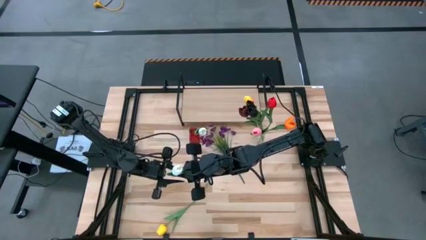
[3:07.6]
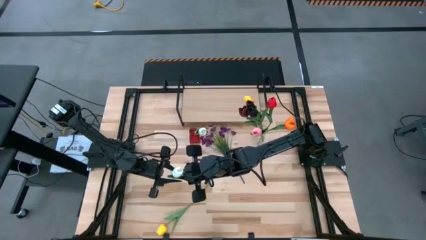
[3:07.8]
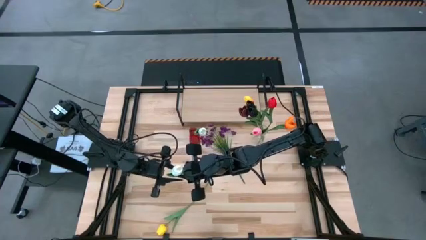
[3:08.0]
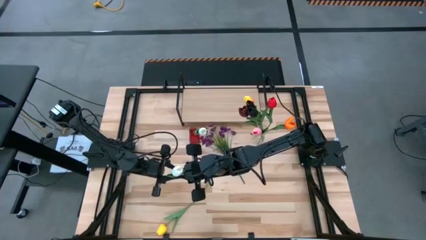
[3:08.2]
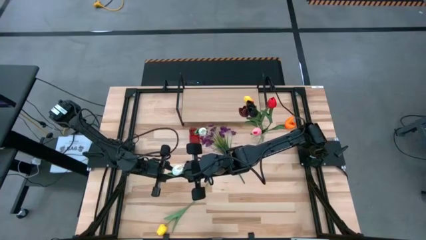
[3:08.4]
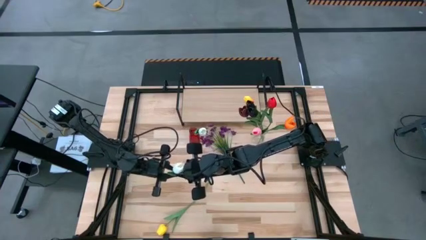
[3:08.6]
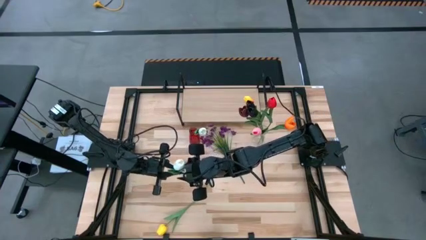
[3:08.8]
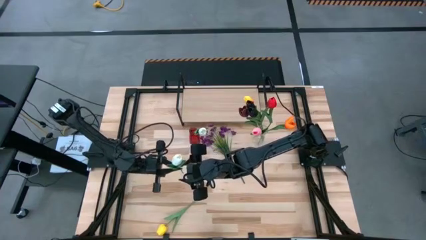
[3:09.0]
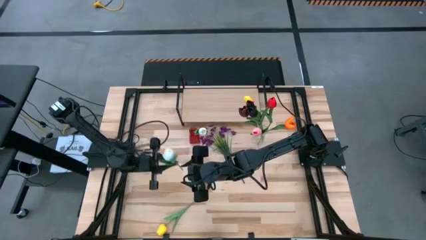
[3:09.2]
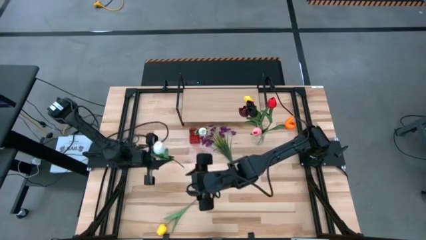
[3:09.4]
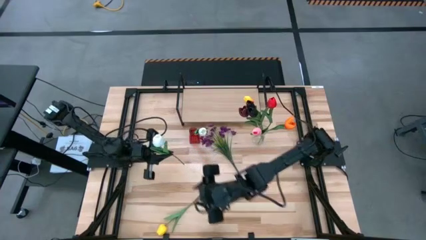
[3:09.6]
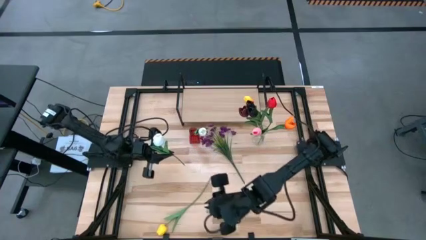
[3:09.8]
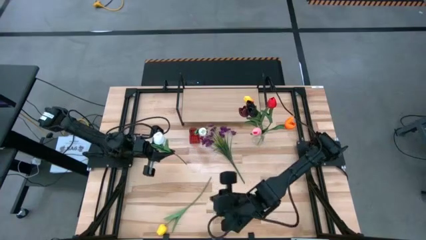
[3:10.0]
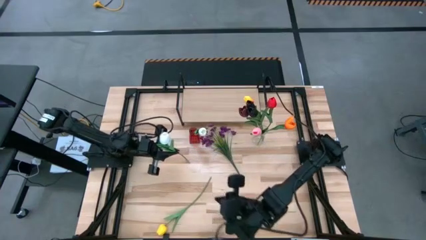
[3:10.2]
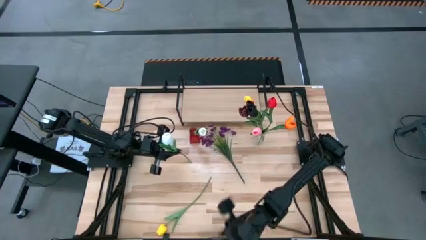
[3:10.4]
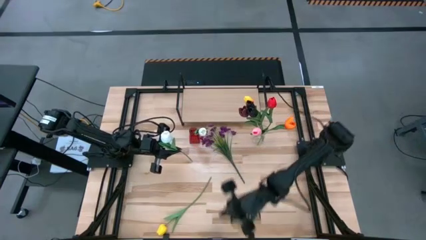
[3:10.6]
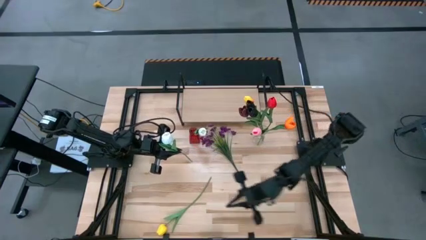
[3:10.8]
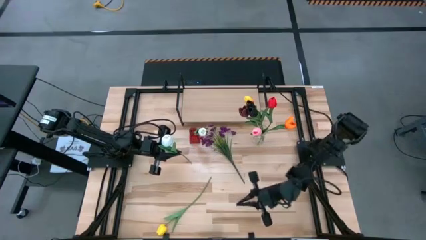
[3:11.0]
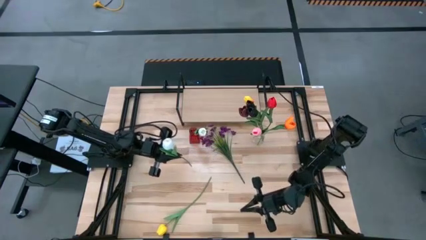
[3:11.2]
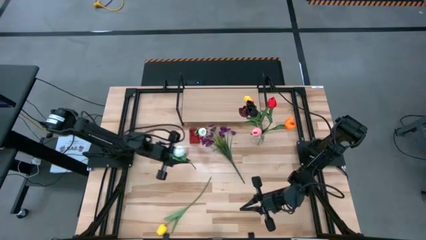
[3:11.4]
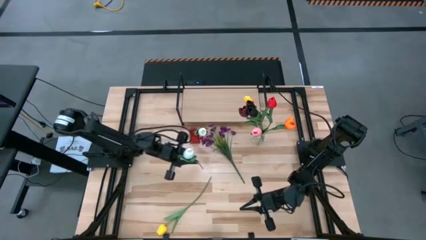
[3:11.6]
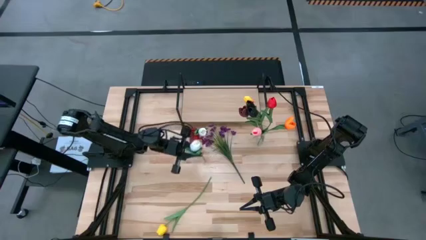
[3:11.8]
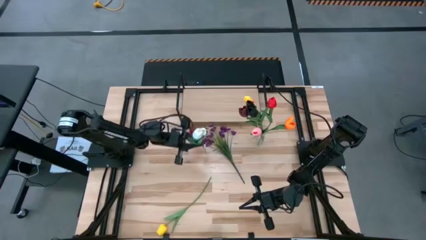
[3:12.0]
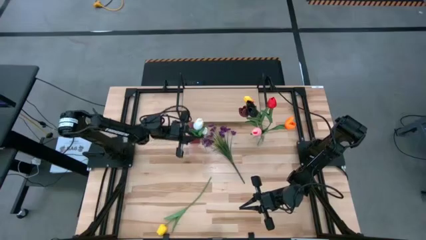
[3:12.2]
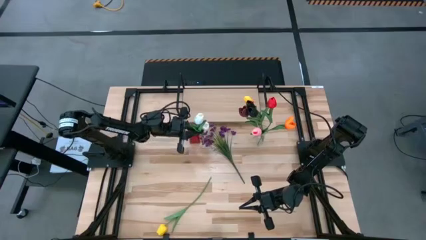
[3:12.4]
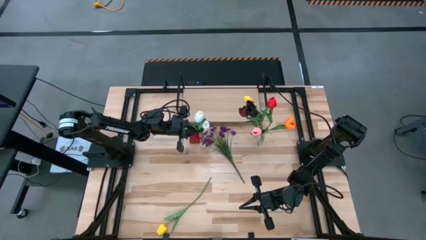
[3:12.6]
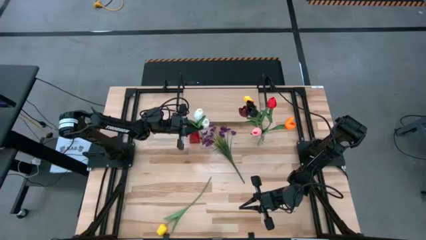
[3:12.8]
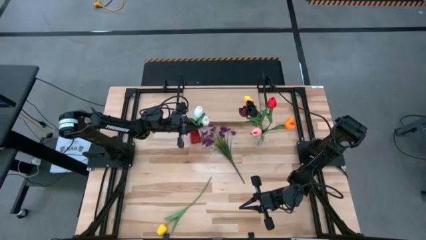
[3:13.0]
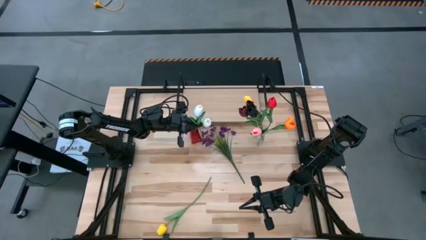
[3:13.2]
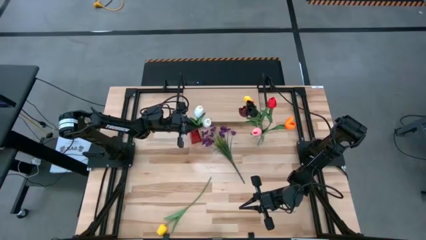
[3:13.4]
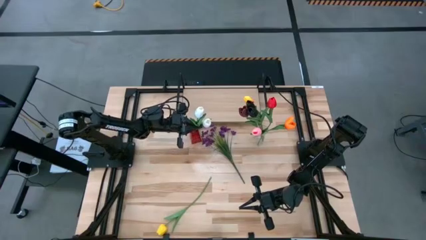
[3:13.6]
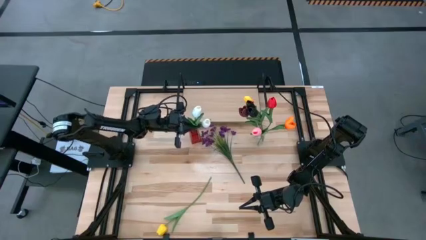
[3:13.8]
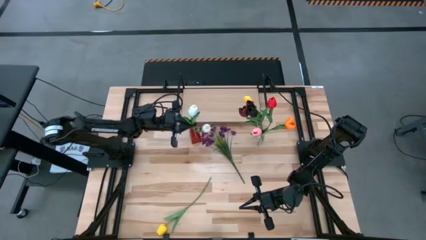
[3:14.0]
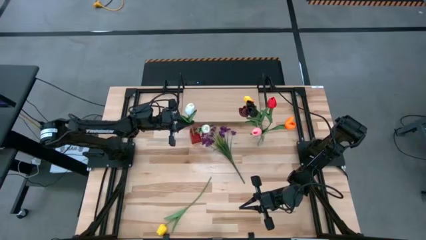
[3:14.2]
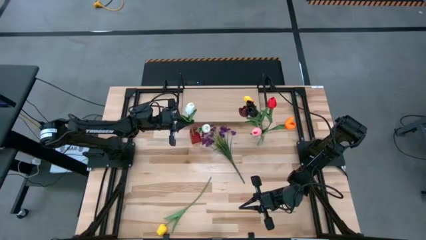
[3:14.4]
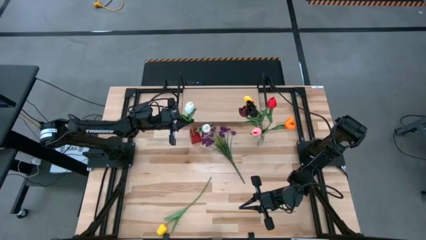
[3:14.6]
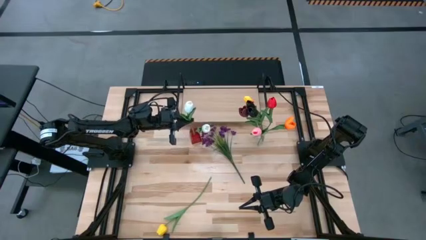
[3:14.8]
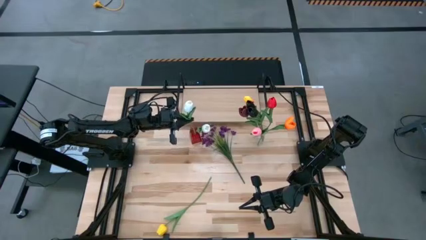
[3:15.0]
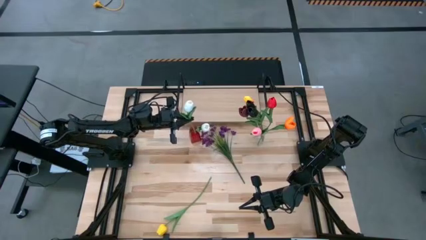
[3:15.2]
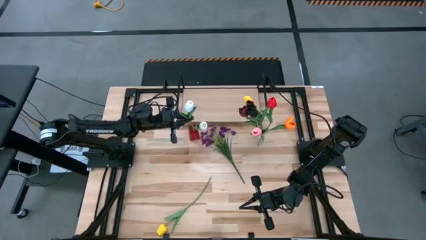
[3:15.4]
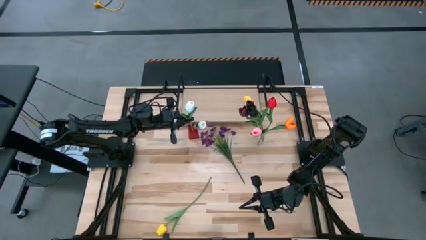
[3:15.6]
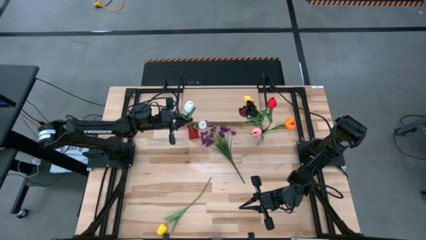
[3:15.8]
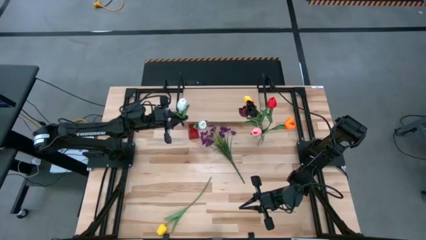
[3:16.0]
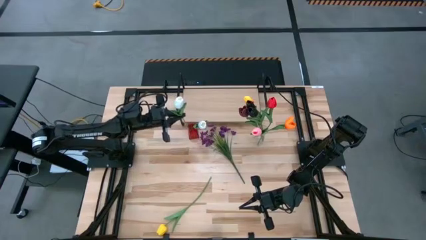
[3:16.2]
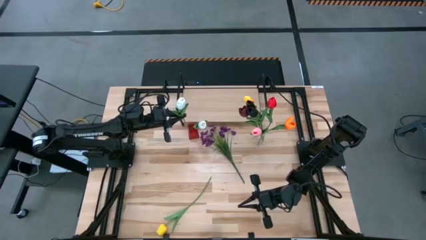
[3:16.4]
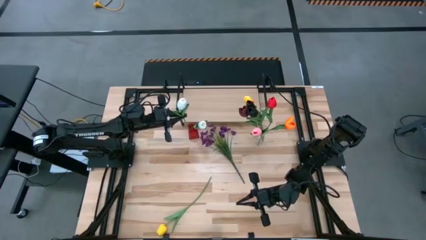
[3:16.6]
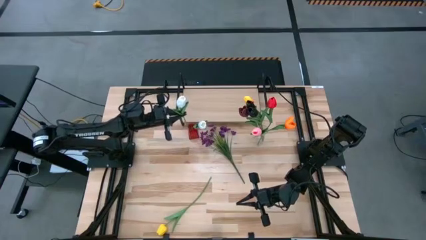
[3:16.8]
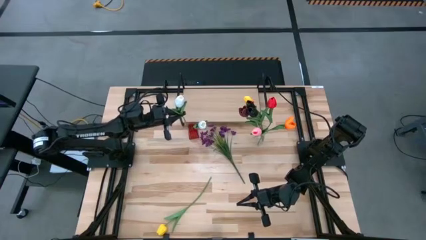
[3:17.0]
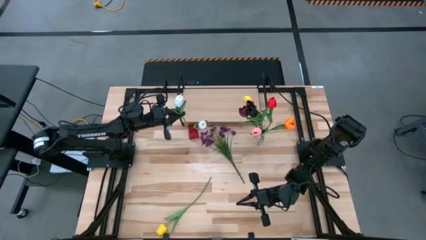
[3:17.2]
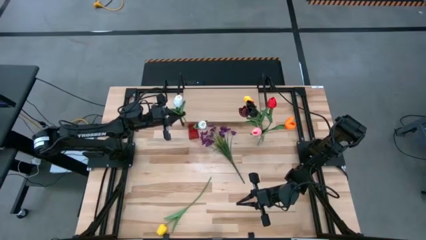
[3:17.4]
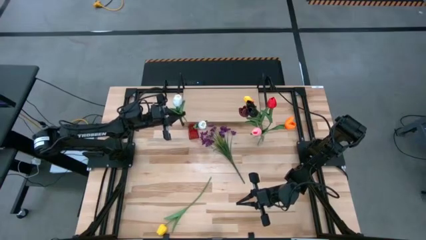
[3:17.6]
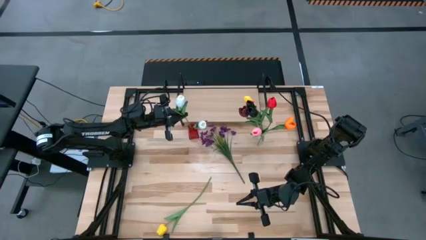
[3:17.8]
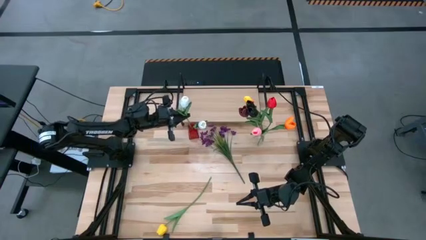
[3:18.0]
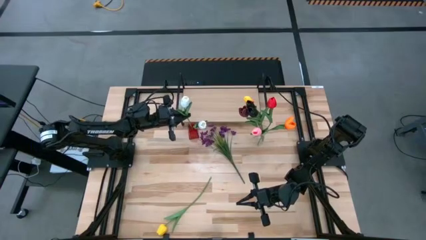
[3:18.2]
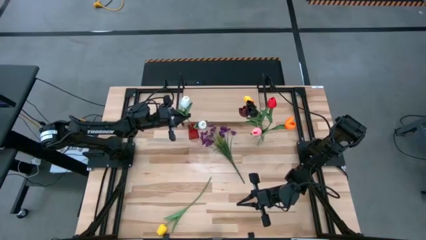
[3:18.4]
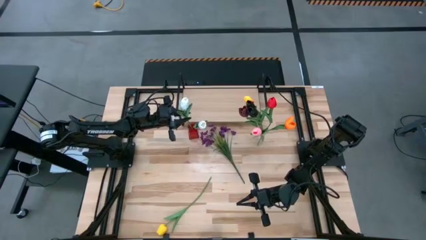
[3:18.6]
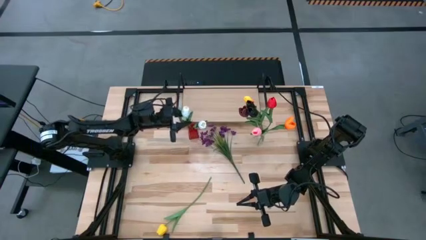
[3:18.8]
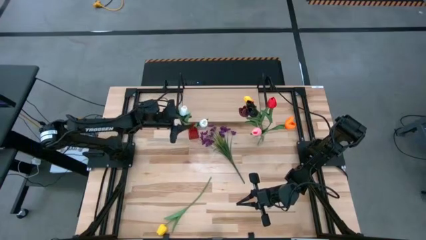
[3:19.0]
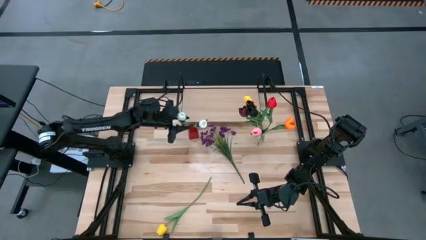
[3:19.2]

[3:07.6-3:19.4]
Task: Pick and place flowers into a vace then onto a shelf
Put the white flower into the red vase

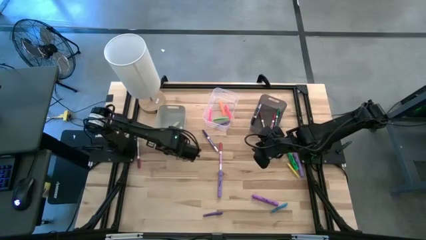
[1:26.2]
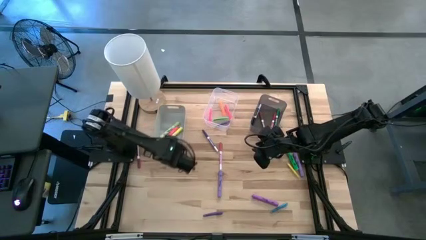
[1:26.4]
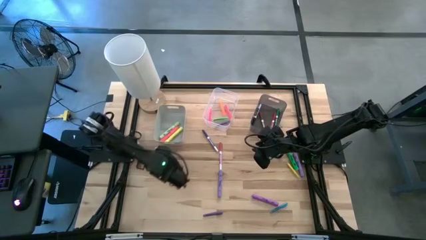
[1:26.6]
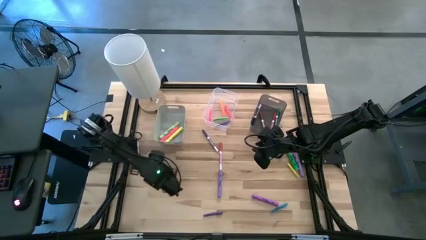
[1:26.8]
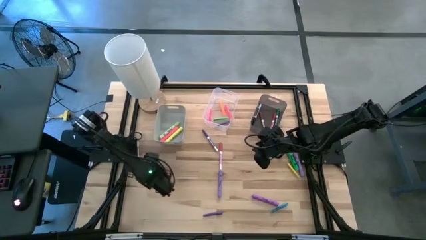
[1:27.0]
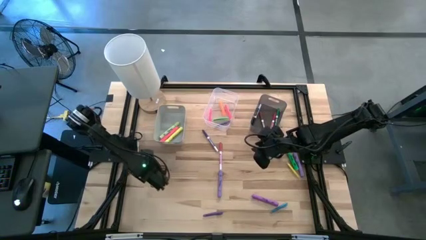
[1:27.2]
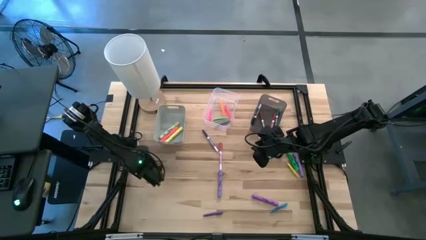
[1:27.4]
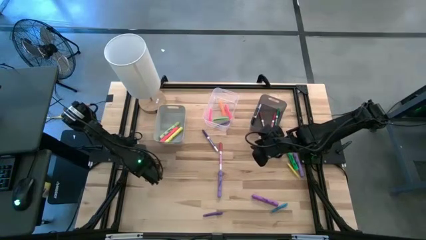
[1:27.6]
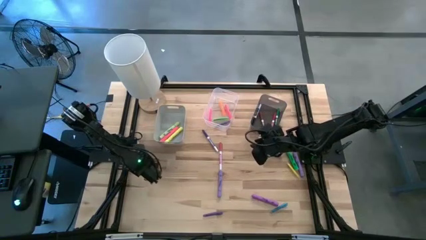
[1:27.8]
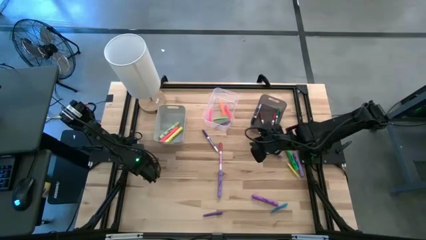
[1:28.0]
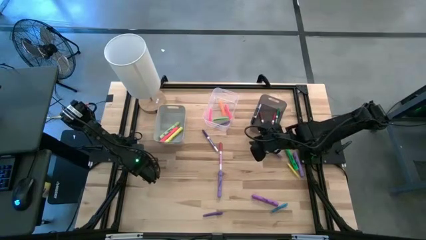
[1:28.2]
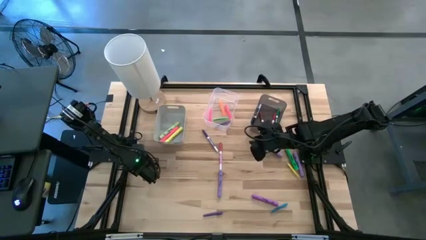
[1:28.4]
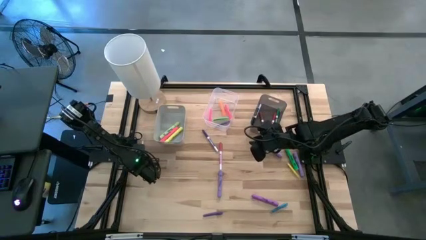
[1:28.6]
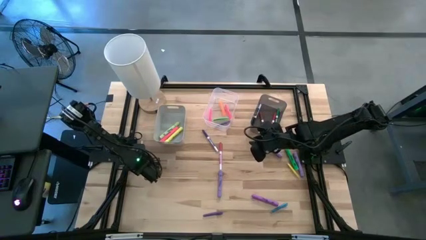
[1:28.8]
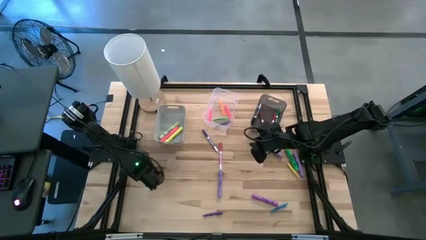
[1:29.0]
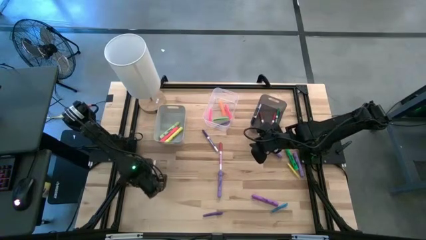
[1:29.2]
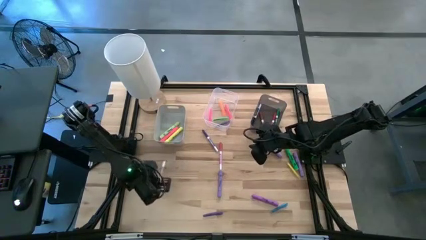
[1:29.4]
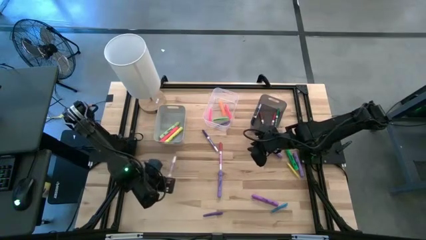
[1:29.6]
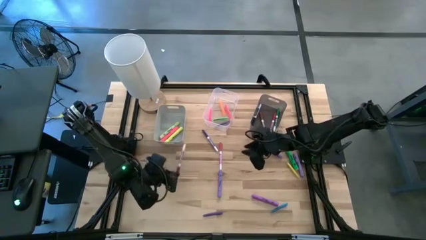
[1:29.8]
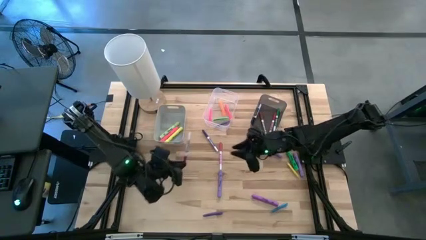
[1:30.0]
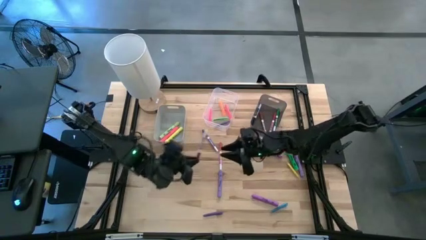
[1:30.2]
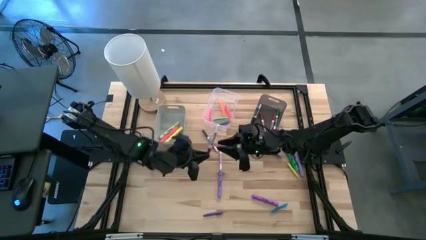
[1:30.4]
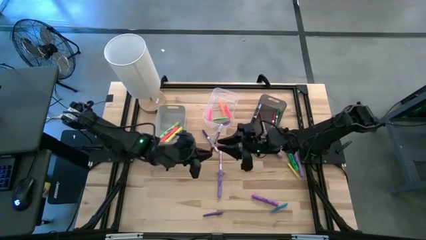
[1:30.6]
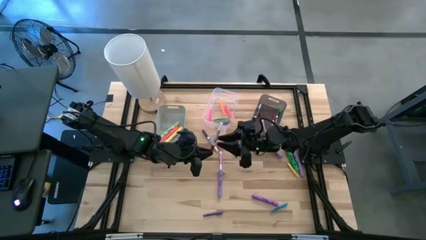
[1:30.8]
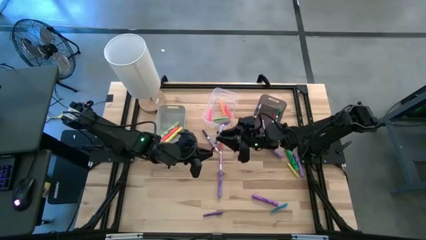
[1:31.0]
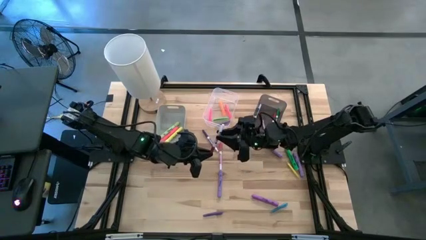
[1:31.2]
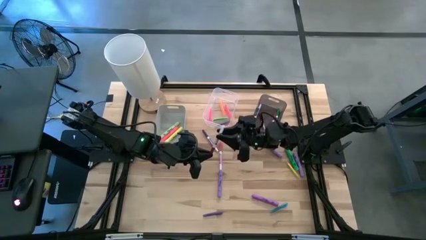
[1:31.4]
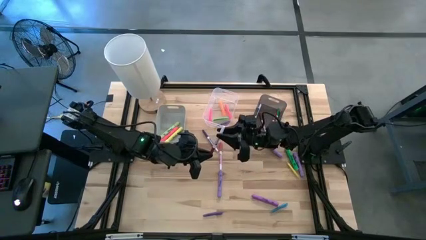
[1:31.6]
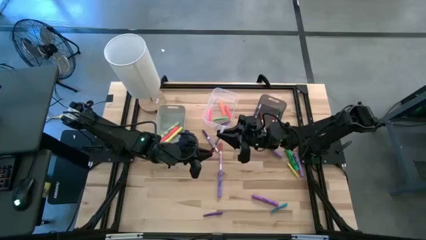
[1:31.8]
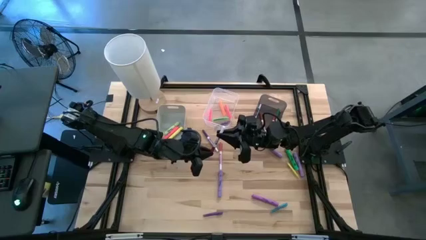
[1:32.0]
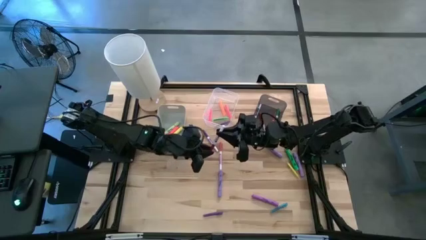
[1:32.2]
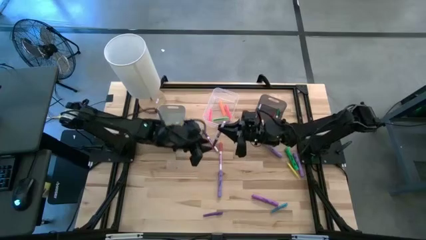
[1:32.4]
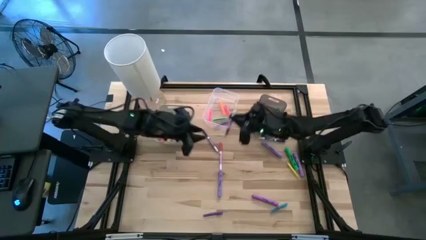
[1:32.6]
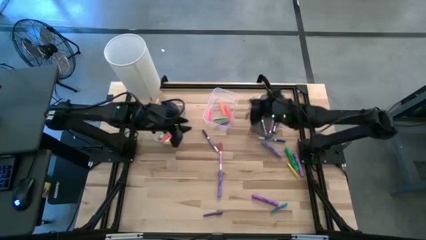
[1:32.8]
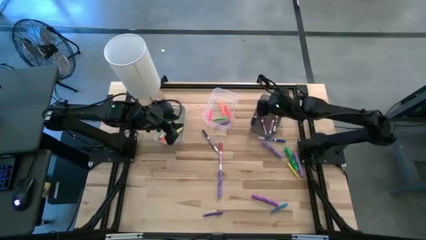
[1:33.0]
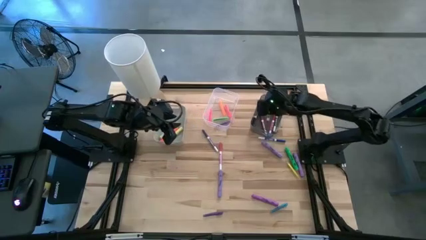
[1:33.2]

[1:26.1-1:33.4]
Task: Pick & Place Markers
Put the purple marker into the black bin
